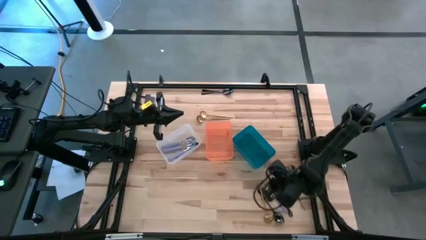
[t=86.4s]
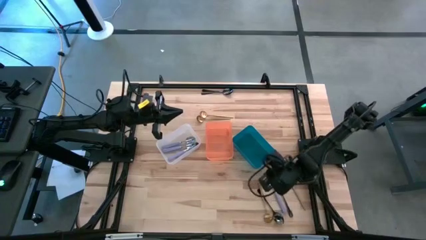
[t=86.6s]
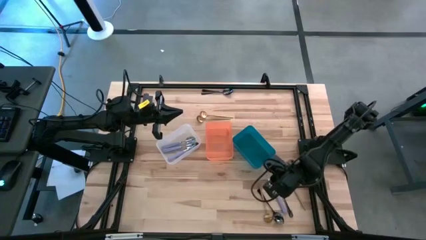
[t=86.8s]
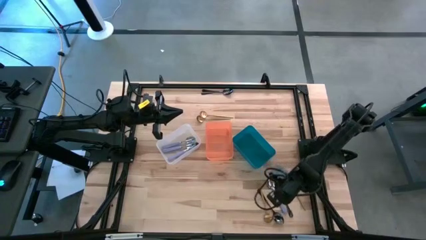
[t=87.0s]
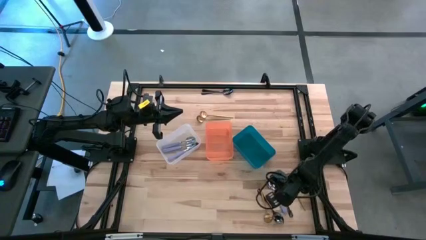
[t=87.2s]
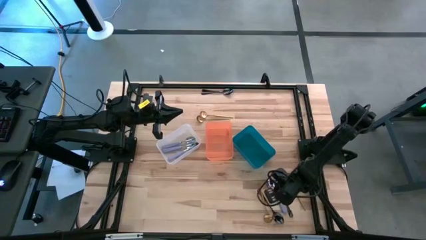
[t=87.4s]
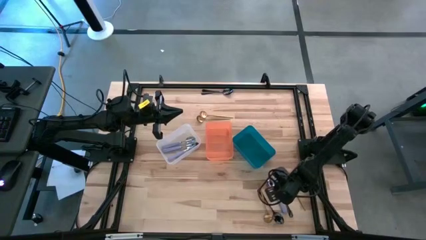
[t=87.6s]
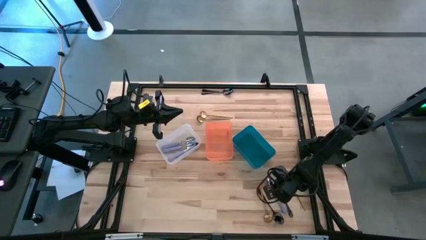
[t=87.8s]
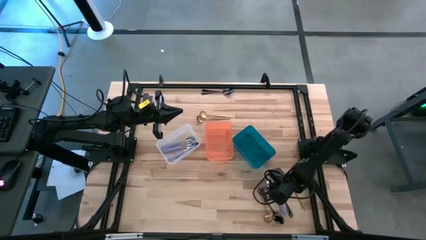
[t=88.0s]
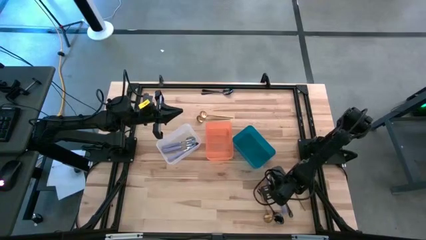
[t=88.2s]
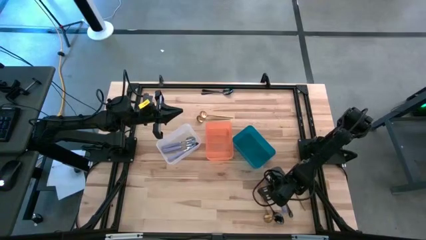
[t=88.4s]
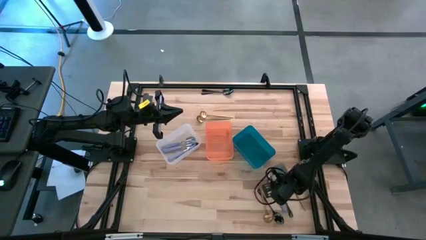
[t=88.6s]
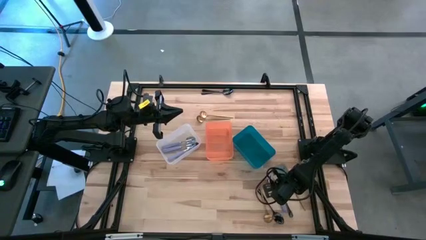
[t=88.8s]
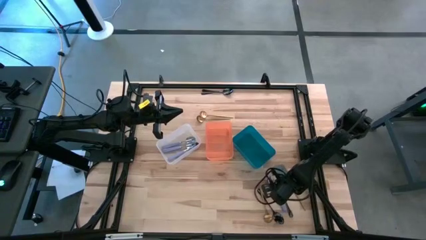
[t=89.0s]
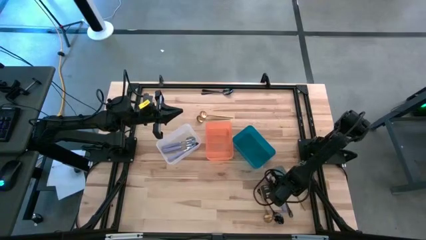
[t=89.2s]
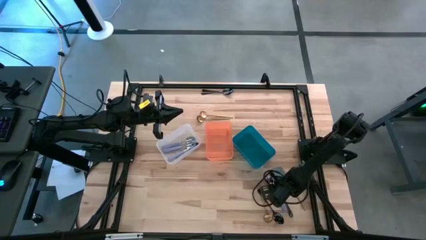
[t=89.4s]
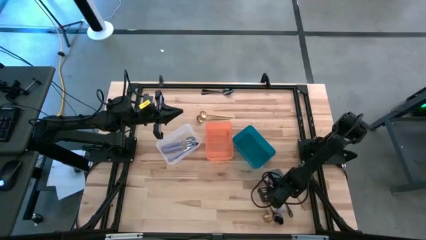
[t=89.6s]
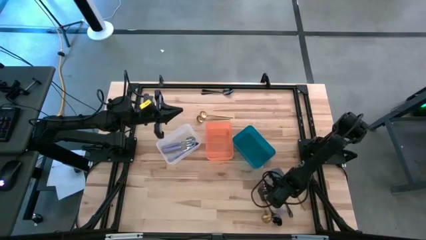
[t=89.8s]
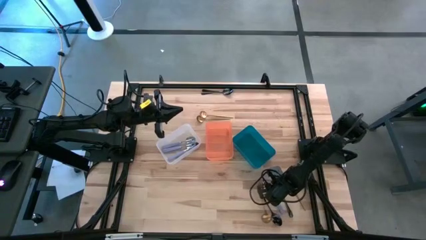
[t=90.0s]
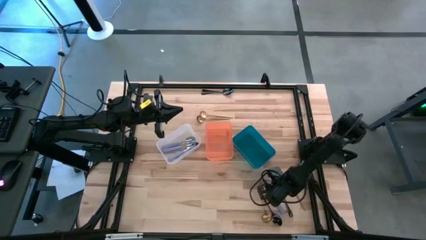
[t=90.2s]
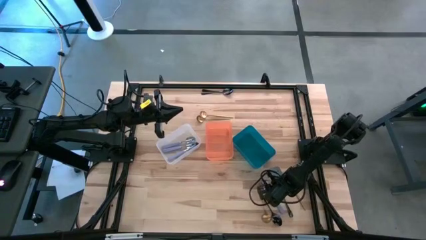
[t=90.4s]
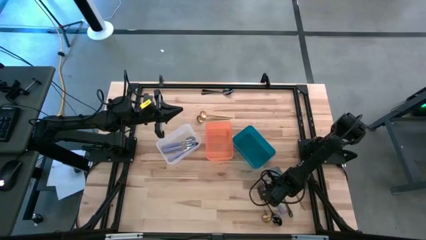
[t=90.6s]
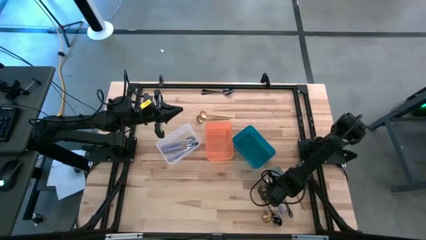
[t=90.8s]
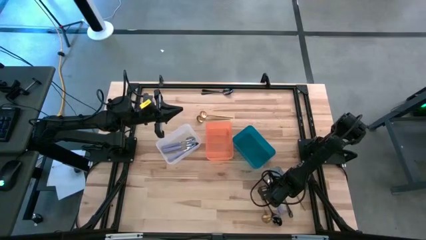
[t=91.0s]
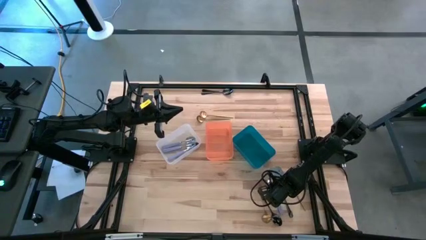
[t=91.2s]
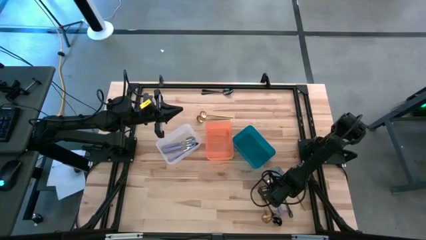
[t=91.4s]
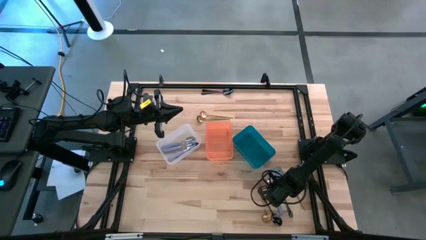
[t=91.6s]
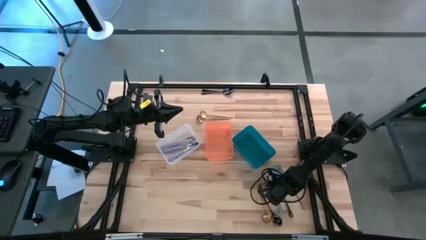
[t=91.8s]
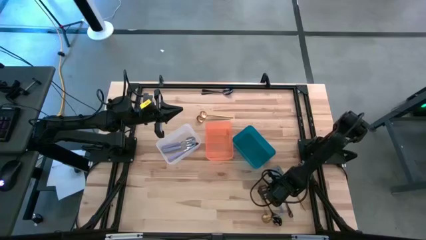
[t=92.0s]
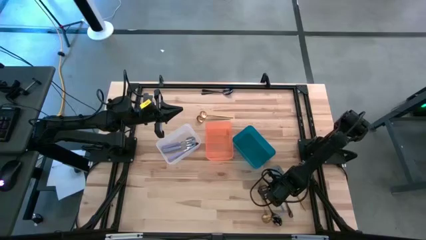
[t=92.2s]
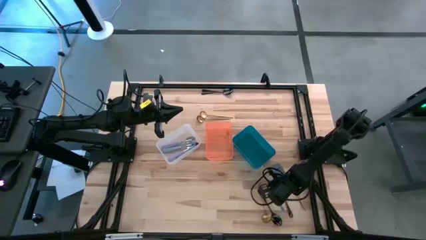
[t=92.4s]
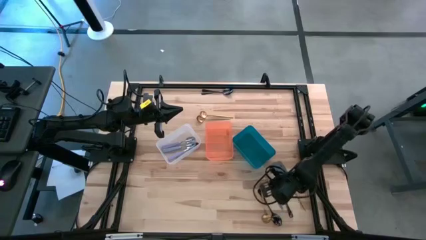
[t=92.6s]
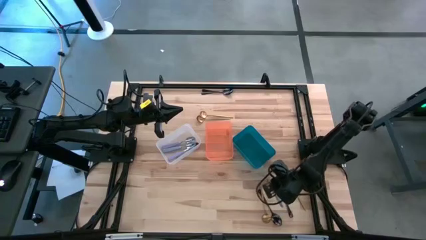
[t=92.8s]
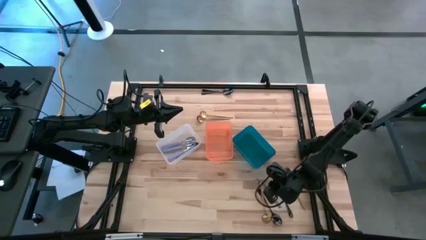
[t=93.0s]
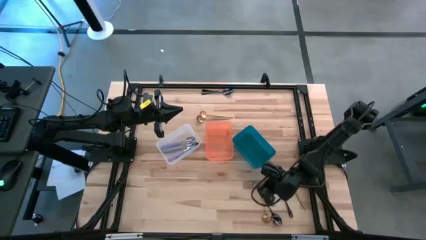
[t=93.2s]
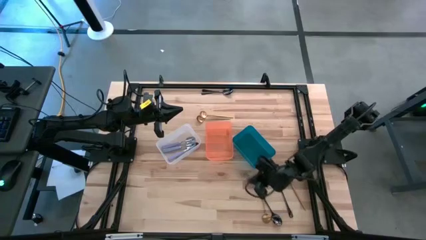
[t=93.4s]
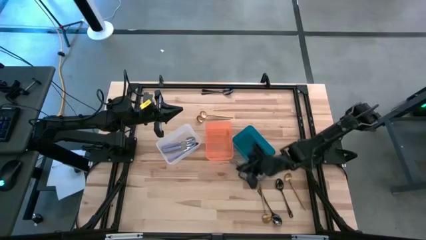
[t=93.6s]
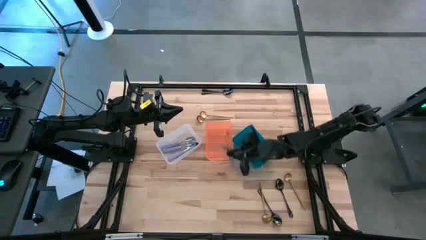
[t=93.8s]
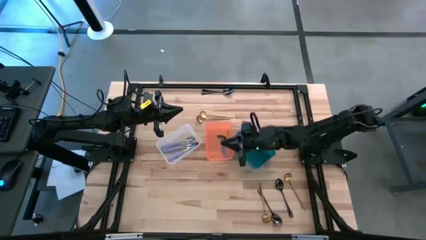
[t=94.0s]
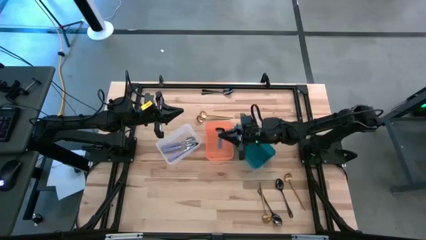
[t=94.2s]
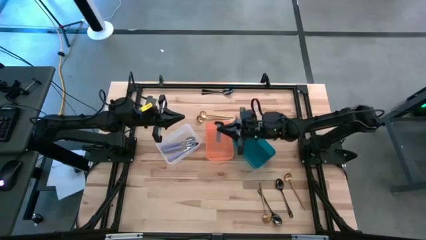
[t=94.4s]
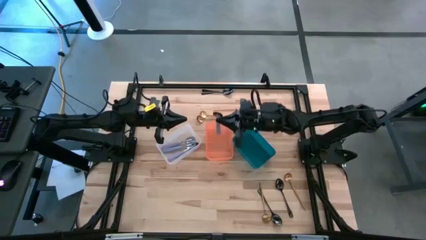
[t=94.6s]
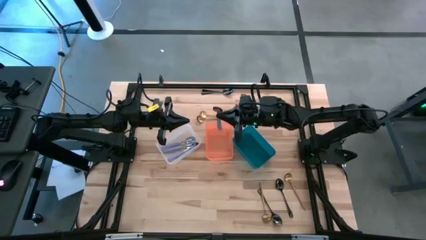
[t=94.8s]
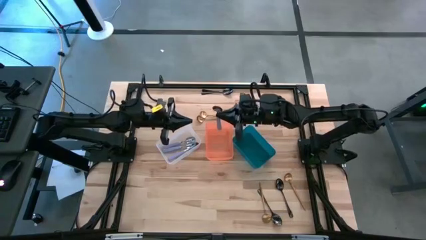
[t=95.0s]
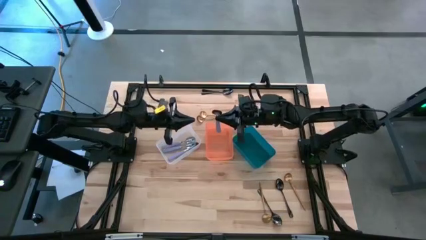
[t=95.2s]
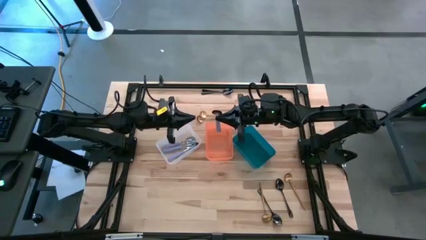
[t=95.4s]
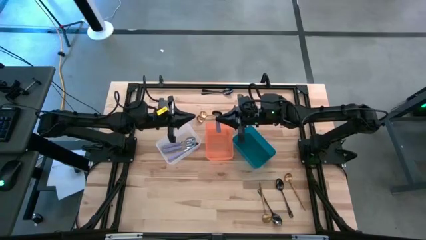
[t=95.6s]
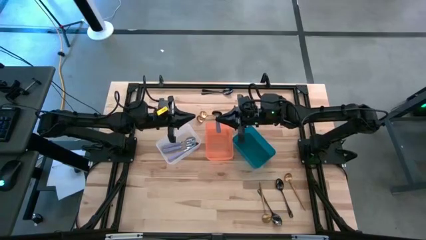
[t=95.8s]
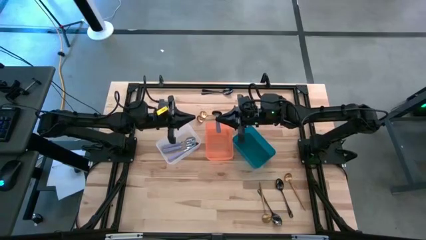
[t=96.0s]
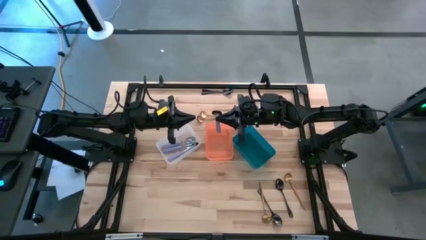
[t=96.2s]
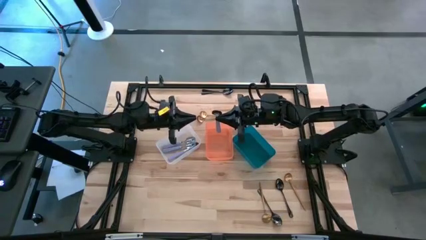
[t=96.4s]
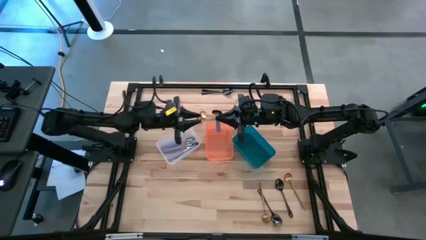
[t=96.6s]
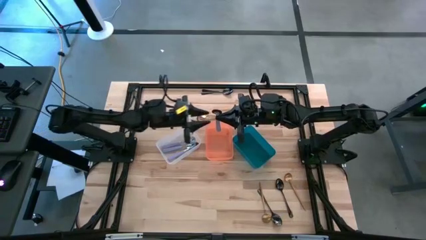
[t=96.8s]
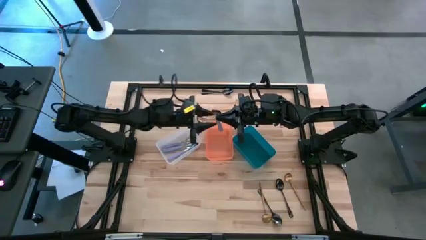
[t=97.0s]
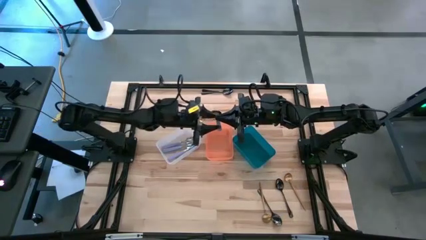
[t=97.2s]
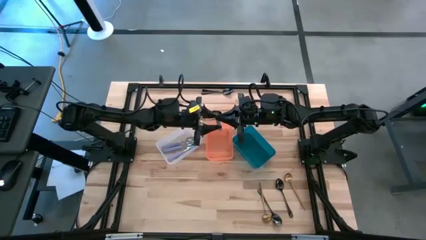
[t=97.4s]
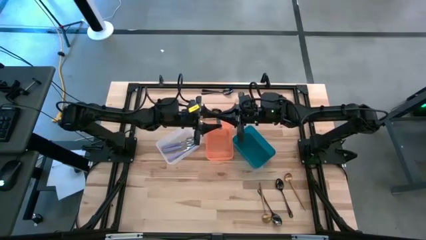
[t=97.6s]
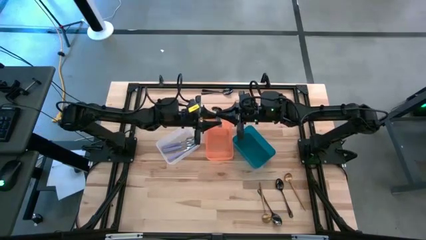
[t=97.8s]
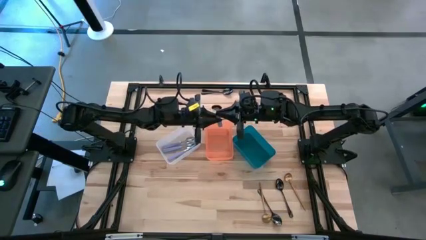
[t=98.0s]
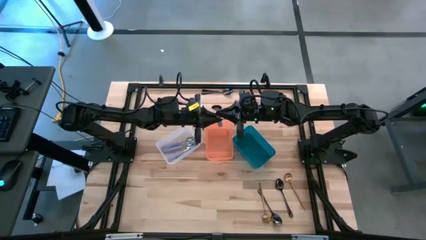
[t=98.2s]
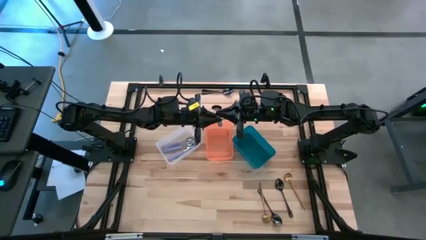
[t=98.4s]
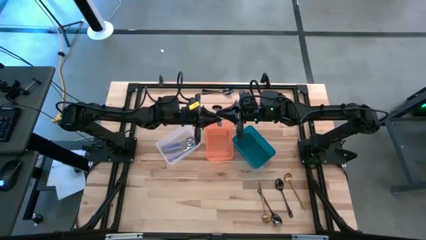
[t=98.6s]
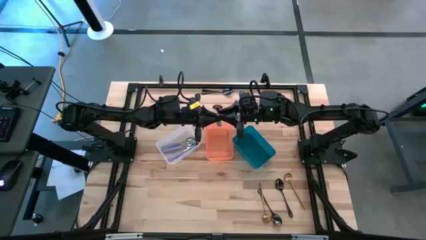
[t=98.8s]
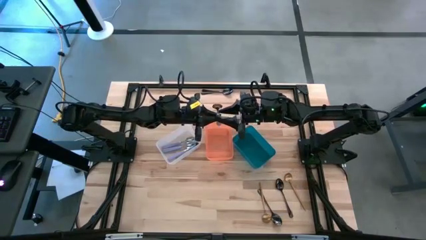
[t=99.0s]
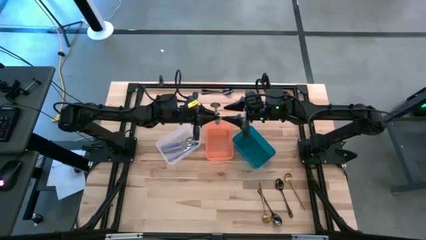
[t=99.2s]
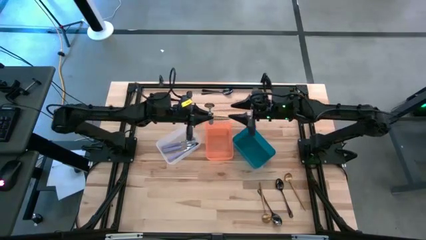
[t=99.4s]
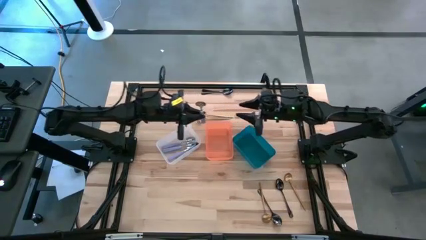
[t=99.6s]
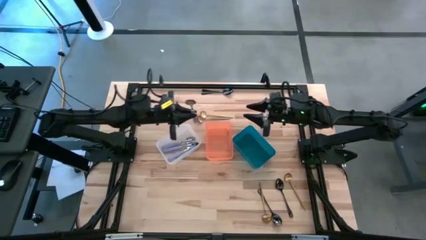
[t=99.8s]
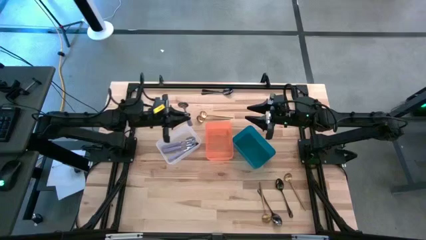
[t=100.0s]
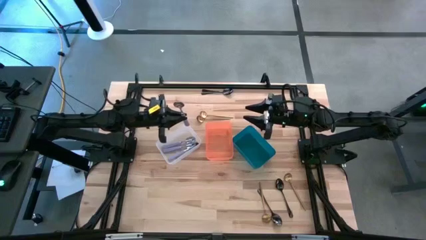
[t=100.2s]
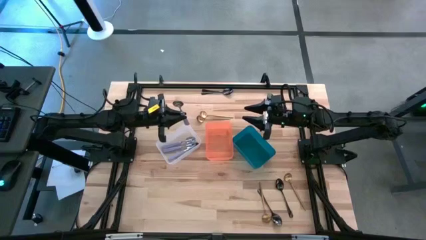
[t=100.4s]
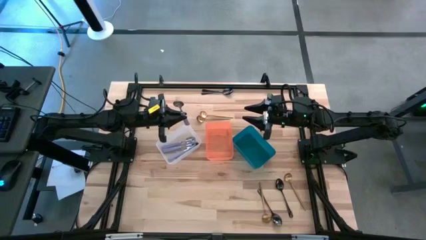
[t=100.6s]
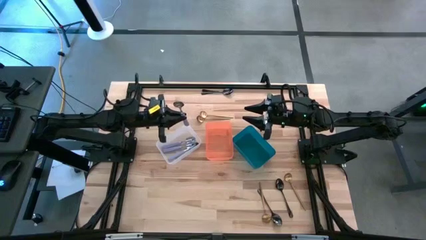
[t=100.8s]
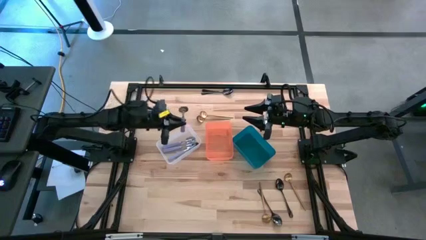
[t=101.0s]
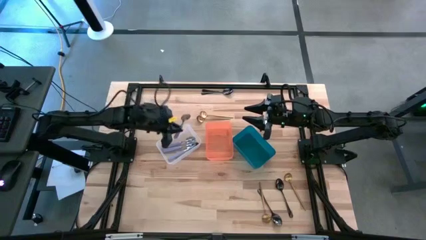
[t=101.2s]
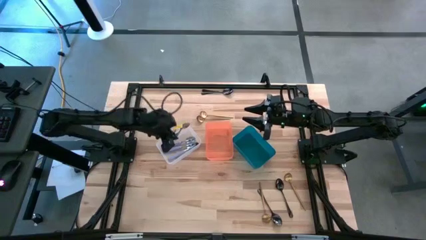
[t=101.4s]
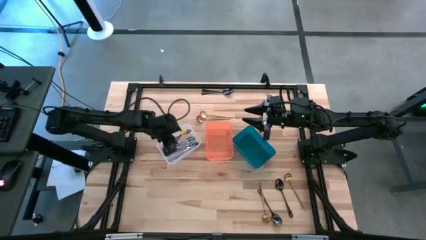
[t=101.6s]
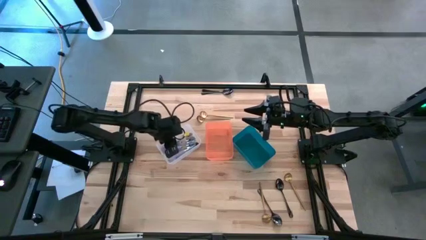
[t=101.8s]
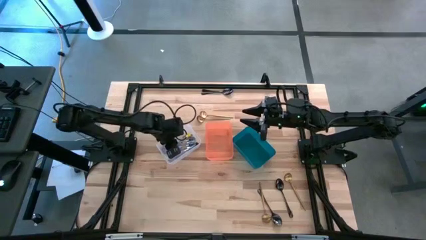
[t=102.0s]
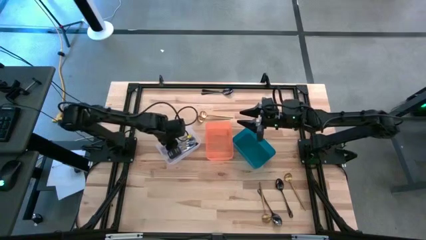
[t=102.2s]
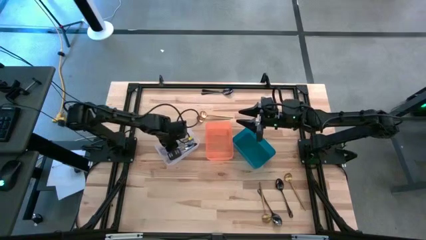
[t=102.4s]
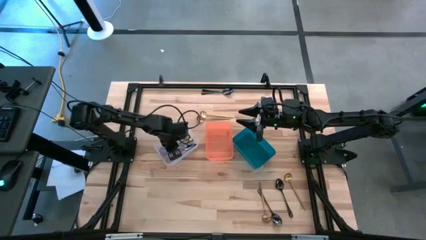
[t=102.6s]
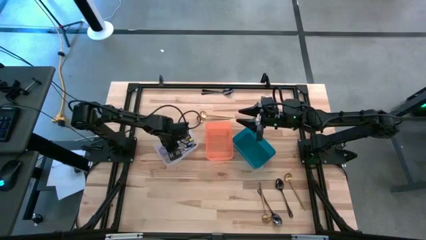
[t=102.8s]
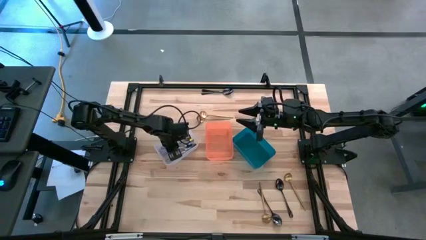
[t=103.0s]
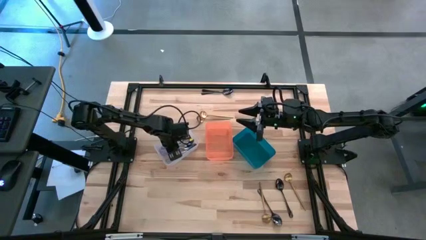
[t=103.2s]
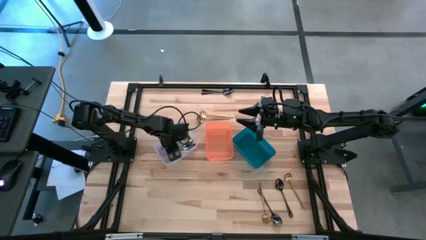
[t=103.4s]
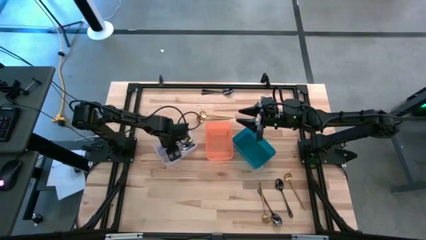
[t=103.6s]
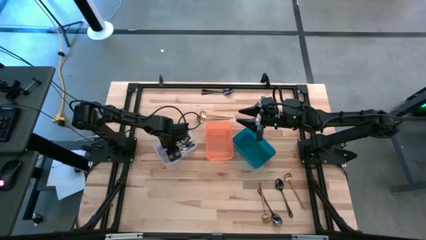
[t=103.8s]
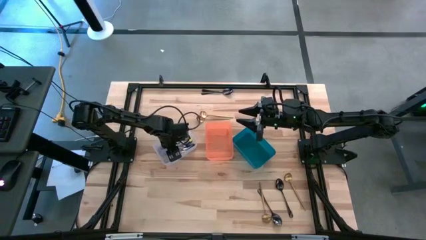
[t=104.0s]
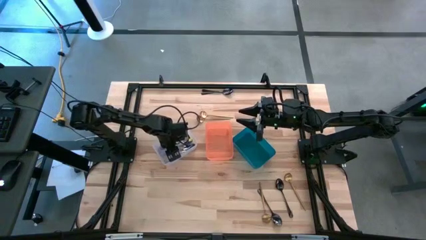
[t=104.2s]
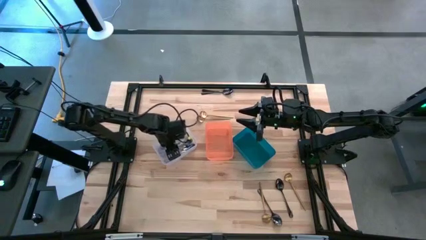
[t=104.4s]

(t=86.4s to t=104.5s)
Task: Sort silverware by color (type)
Put the purple spoon into the white bin
